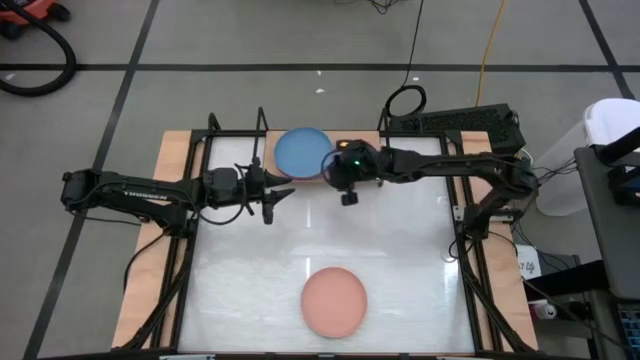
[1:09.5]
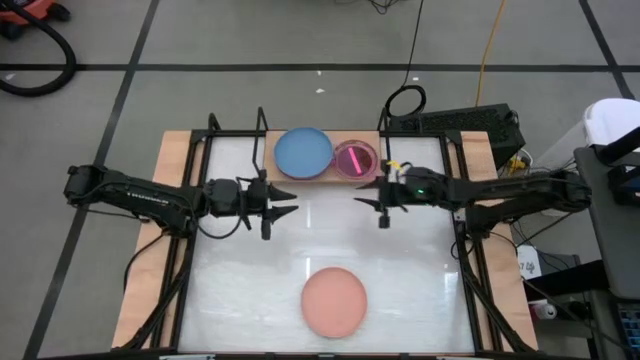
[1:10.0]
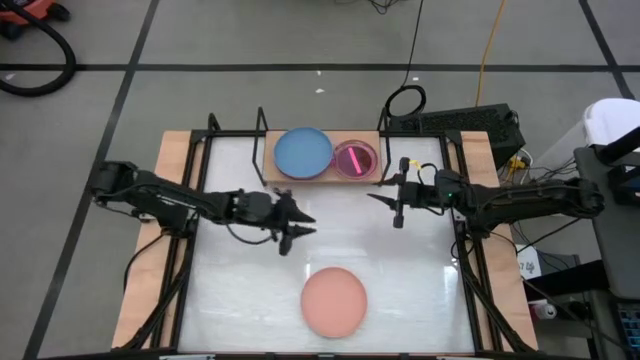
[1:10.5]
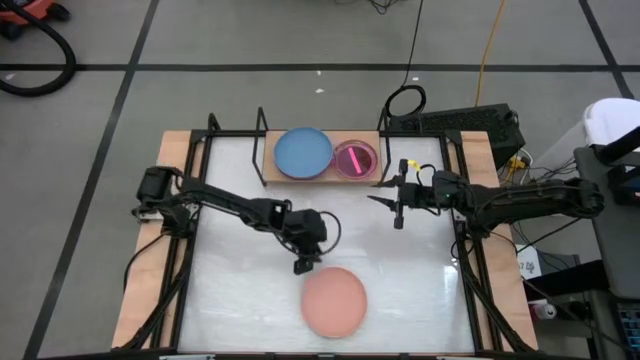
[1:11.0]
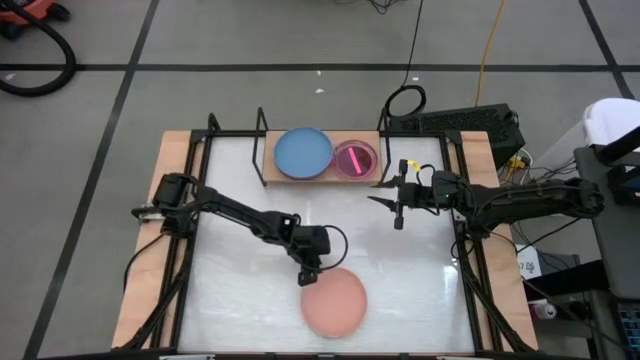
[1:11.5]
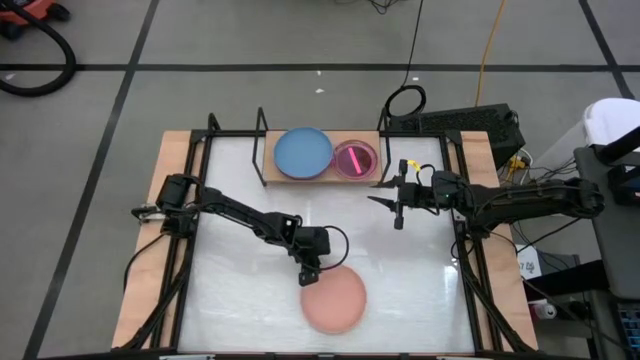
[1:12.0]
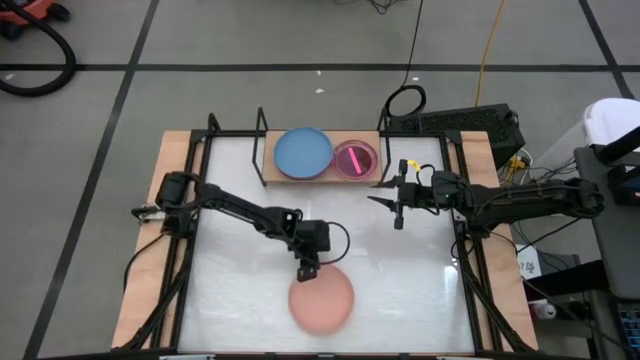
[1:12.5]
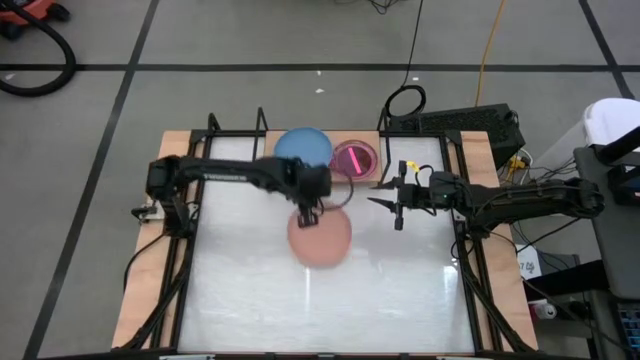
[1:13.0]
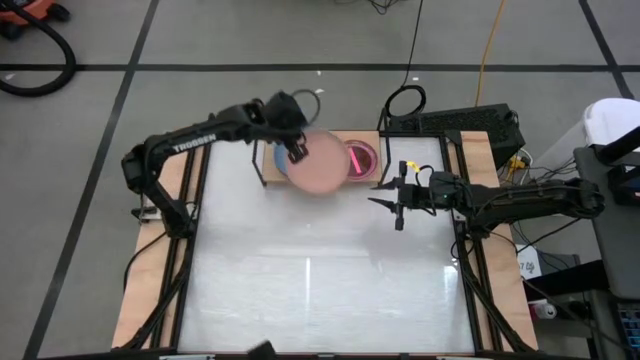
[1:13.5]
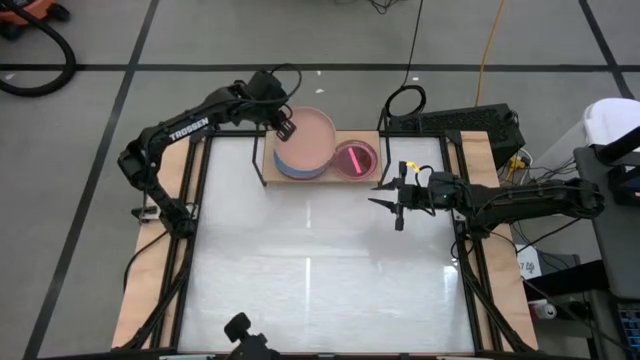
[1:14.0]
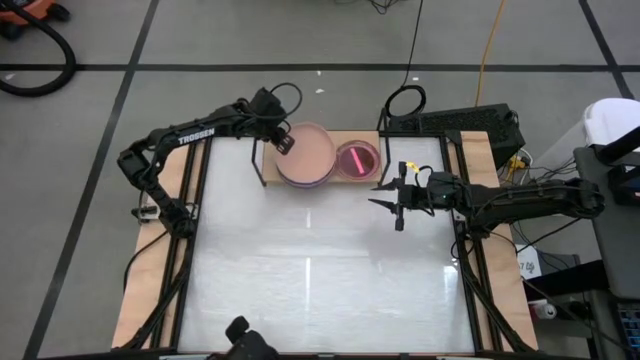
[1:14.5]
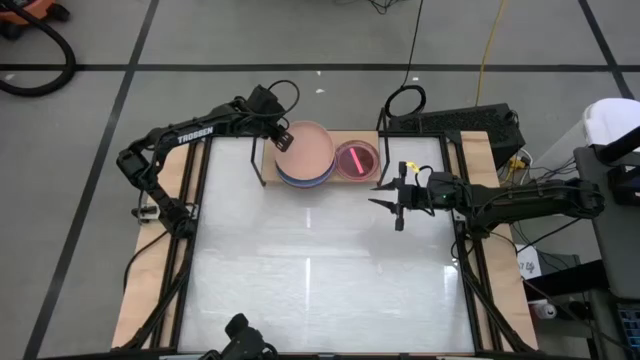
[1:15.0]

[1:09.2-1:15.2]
Task: Place and stack plates onto a shelf
Stack the peach plate on the blue plate

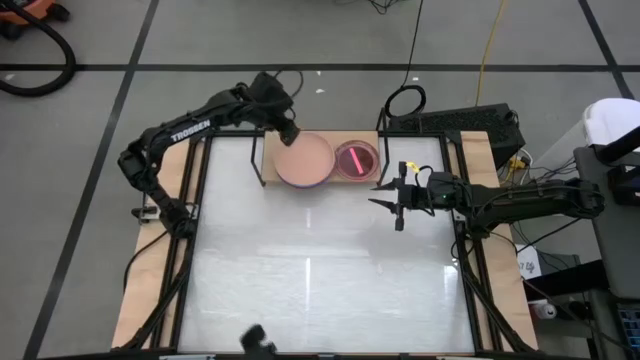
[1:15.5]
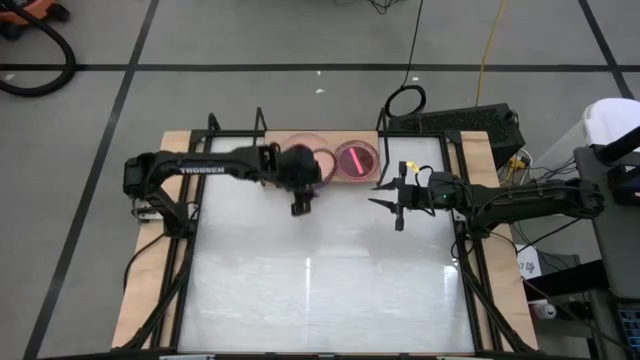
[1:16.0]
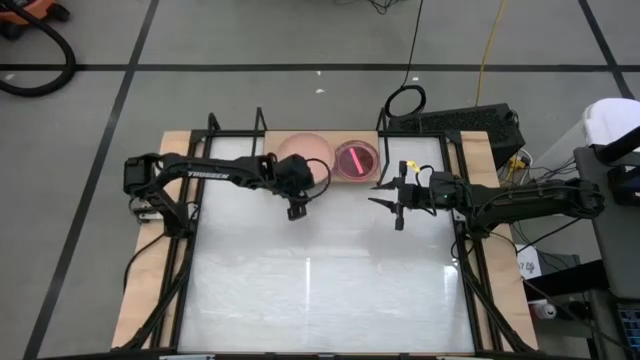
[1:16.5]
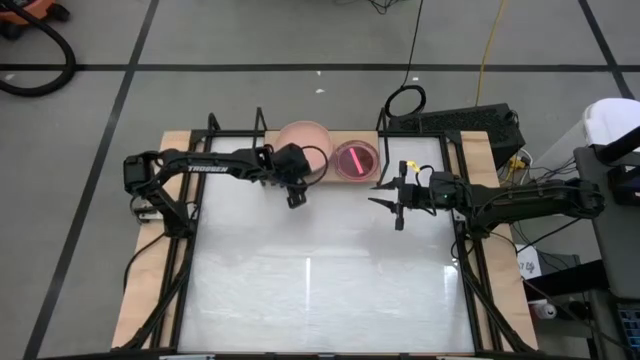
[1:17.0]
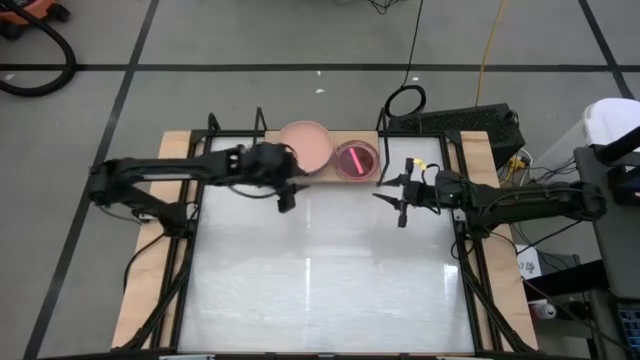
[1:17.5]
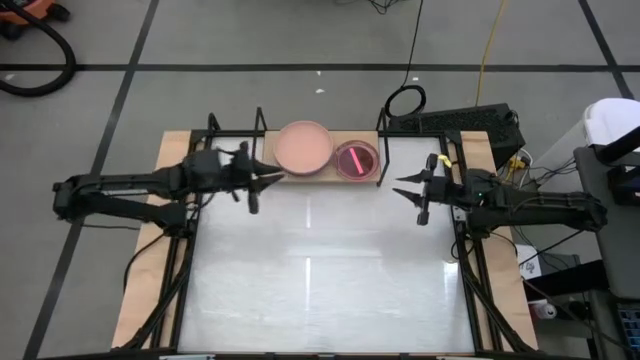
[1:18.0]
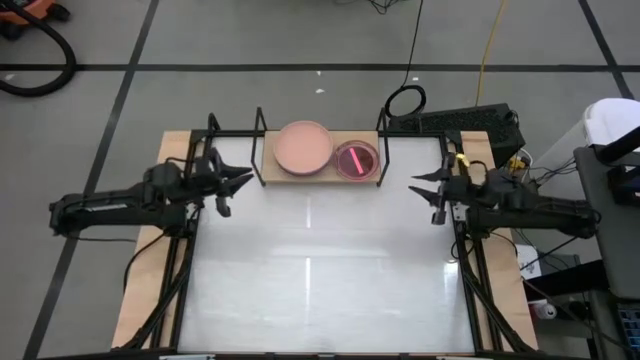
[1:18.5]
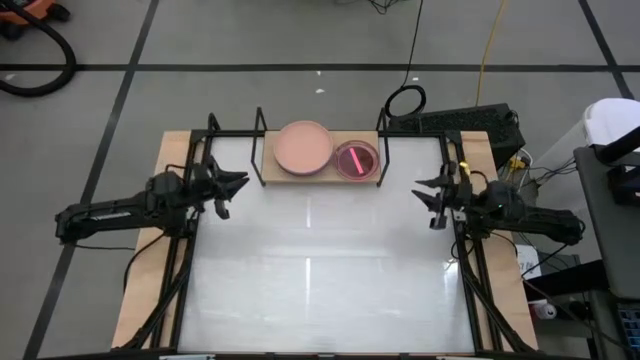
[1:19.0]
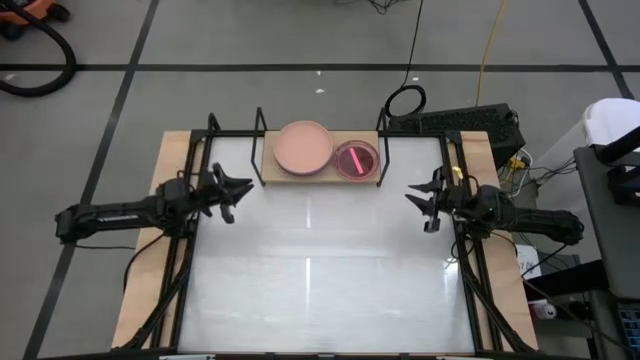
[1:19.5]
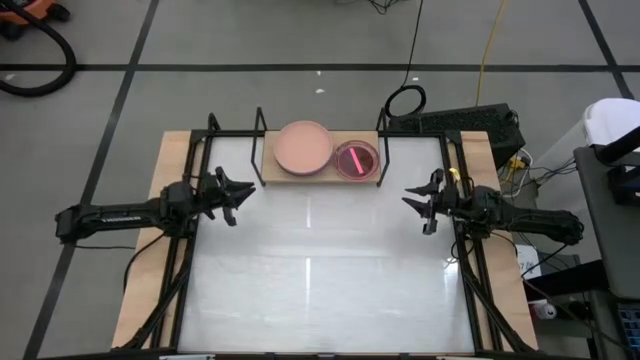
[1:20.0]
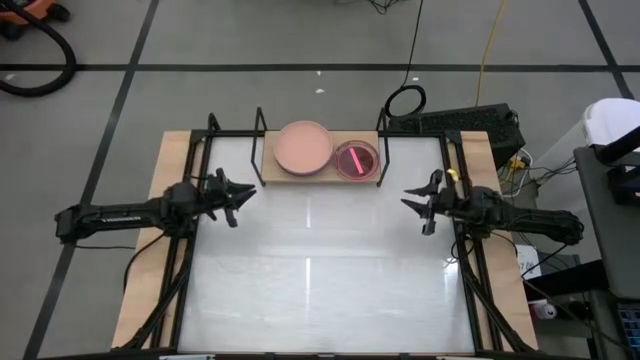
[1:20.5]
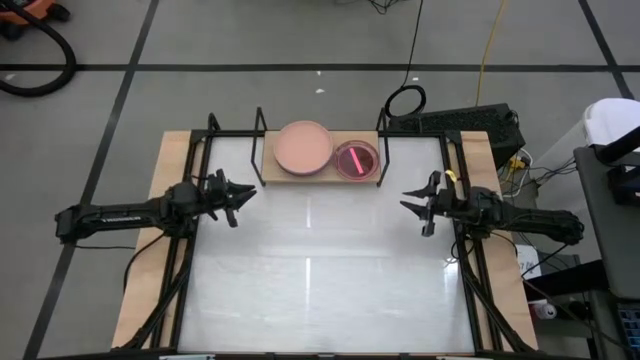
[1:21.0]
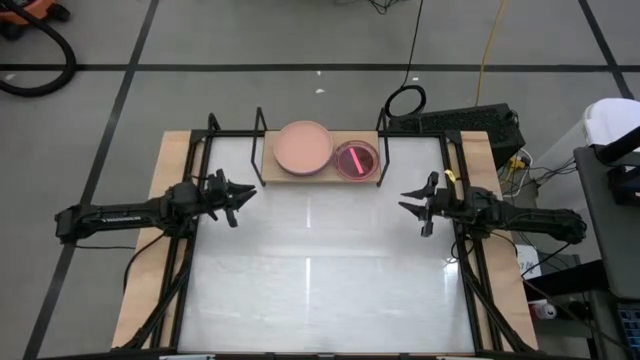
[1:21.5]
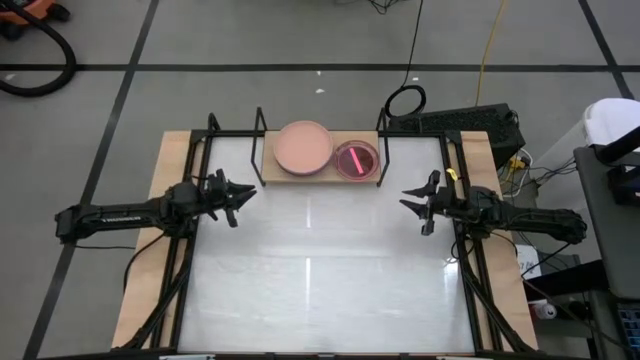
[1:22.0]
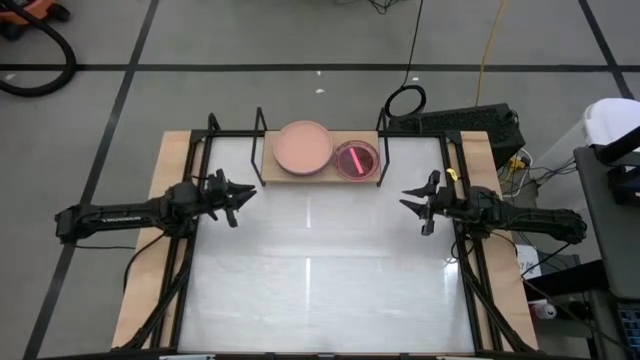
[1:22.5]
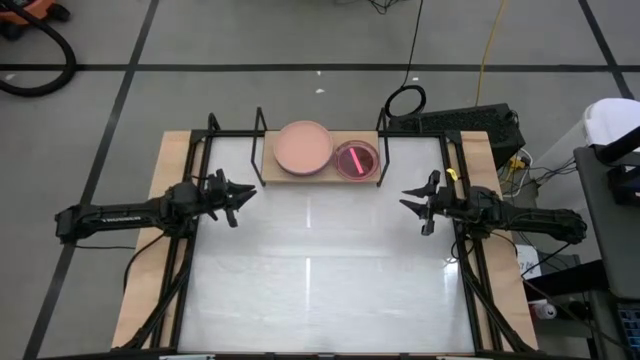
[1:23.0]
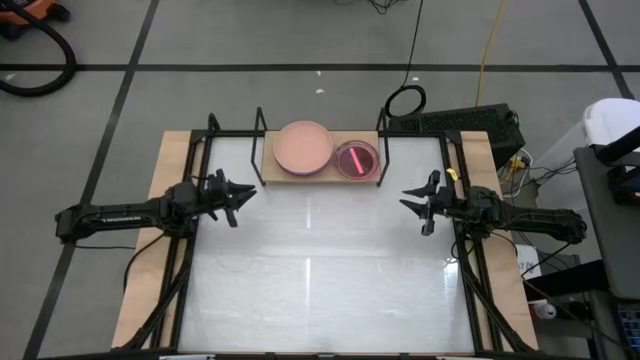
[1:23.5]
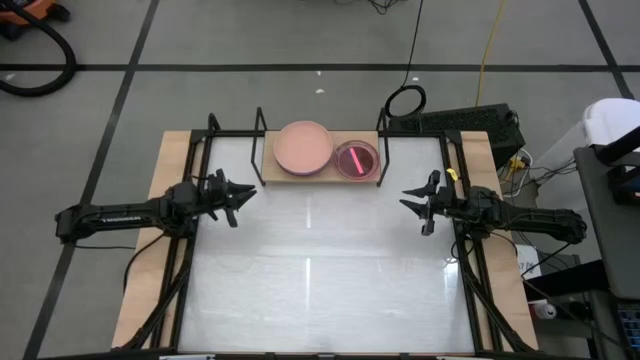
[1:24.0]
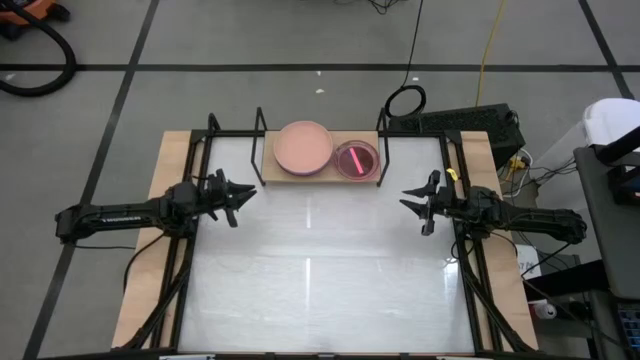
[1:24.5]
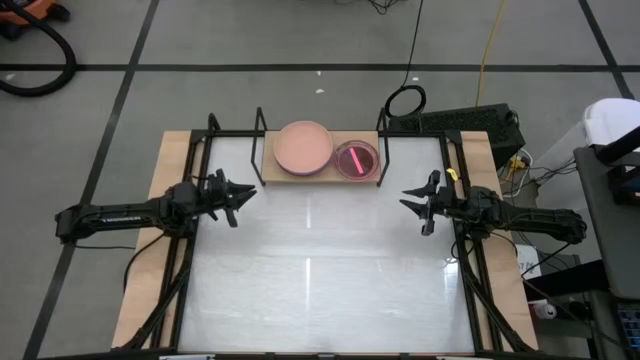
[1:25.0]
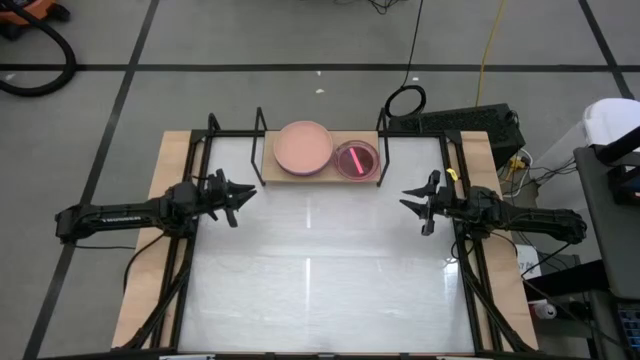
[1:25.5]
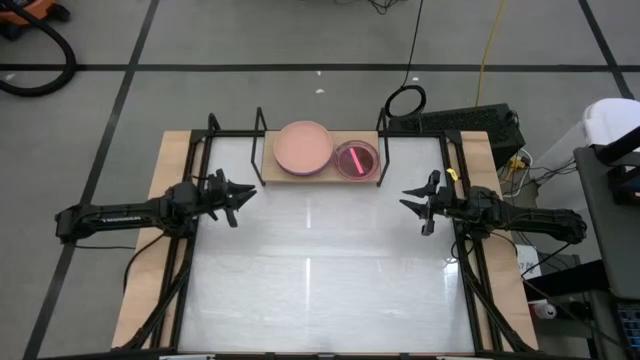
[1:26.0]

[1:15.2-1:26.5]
Return to Home Position
